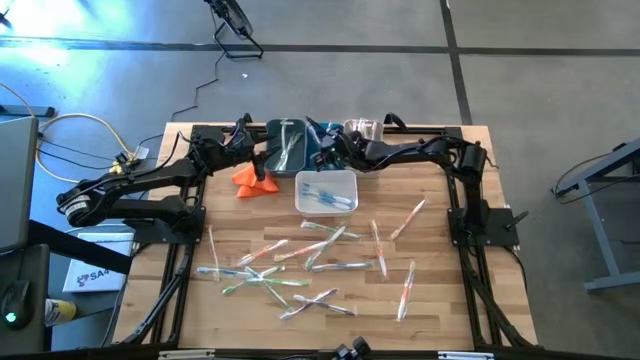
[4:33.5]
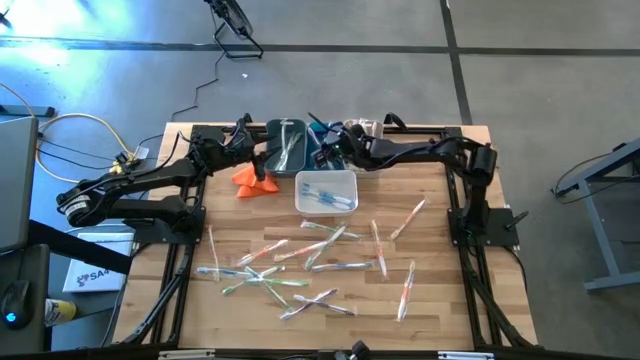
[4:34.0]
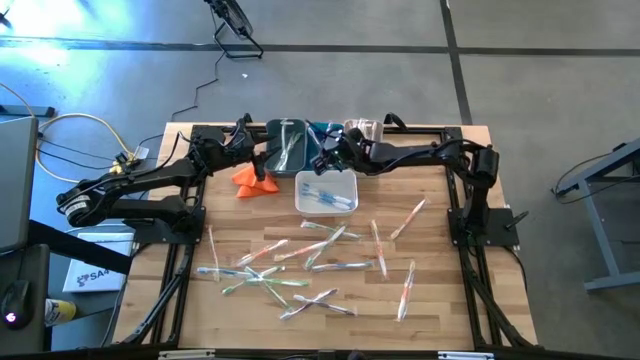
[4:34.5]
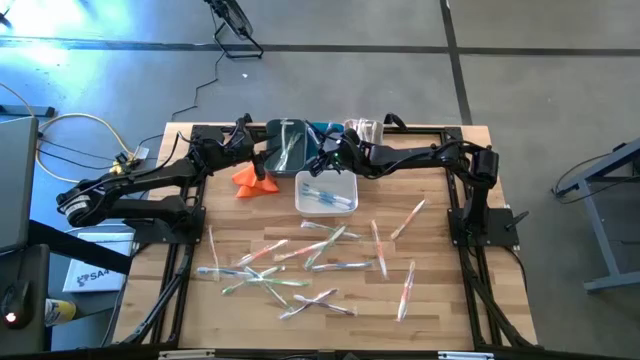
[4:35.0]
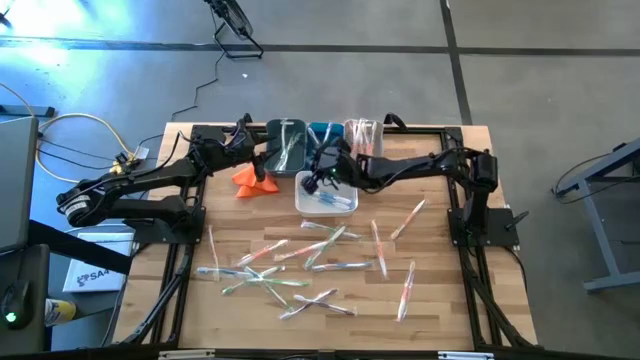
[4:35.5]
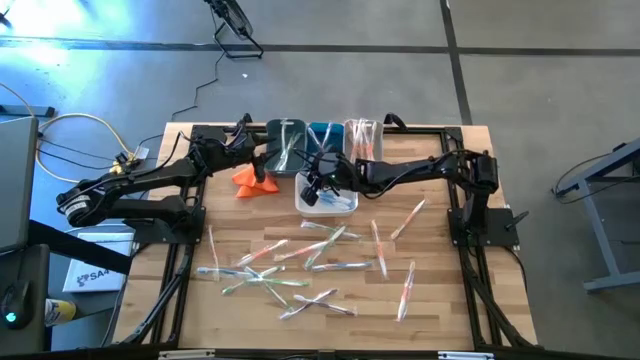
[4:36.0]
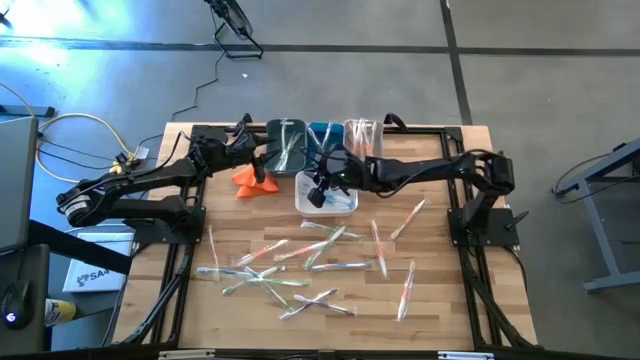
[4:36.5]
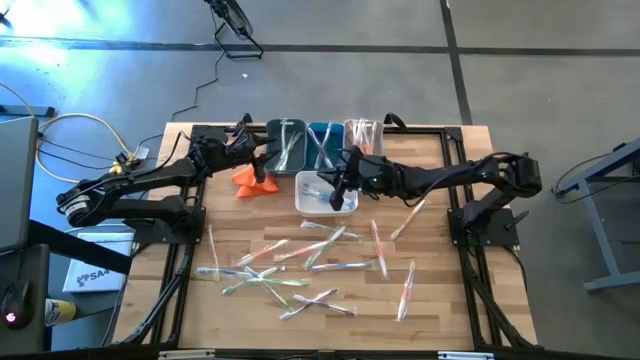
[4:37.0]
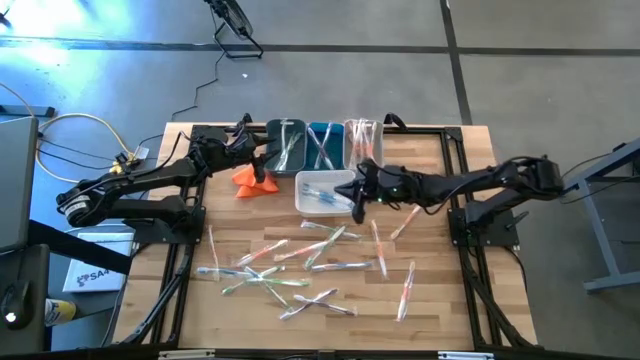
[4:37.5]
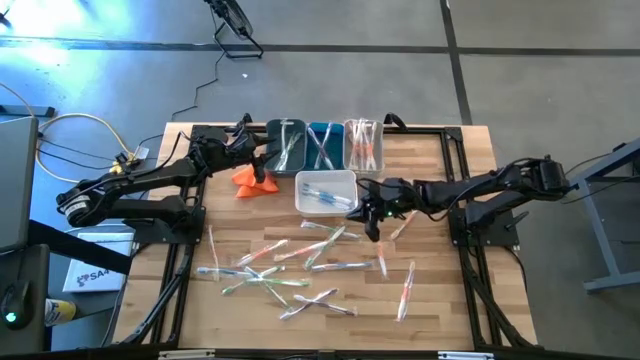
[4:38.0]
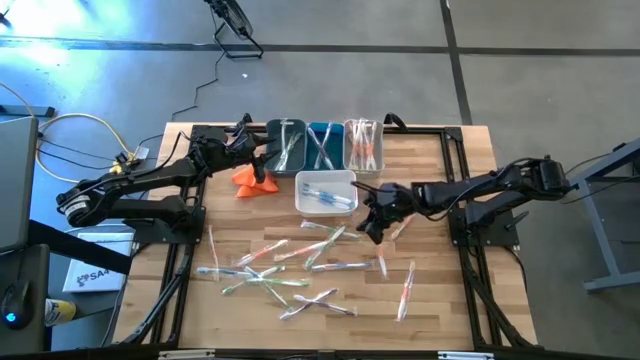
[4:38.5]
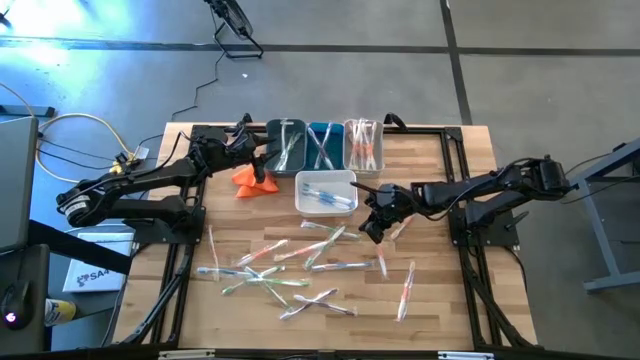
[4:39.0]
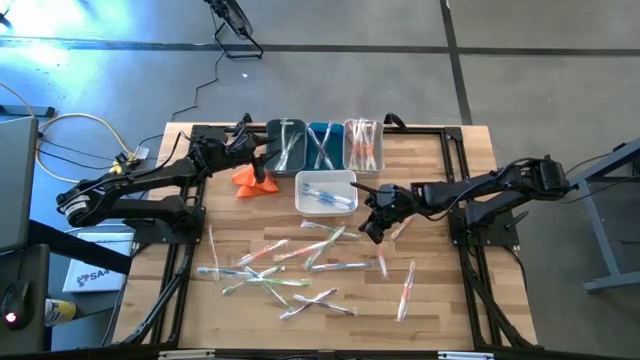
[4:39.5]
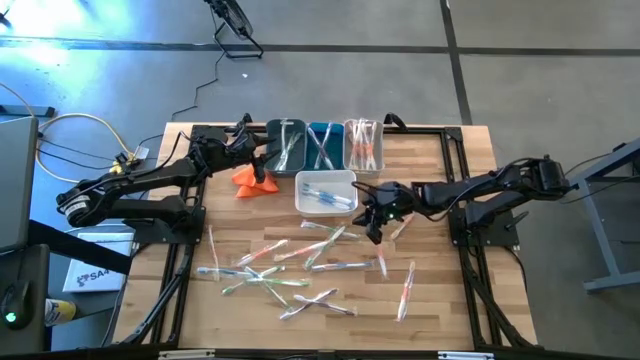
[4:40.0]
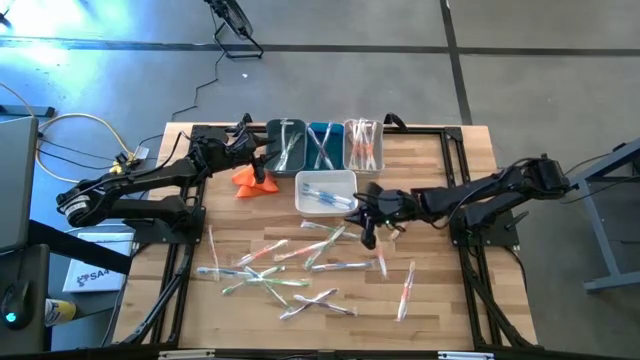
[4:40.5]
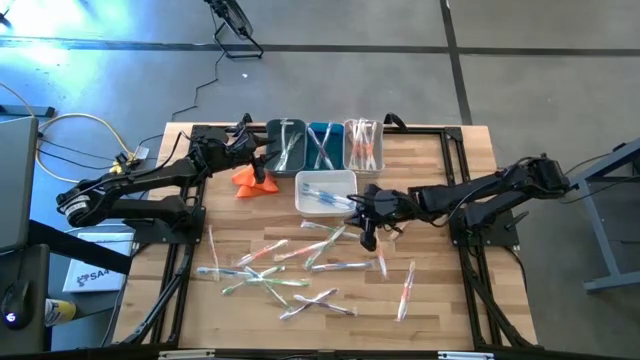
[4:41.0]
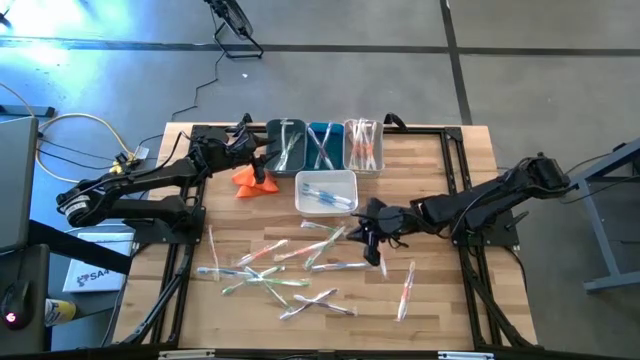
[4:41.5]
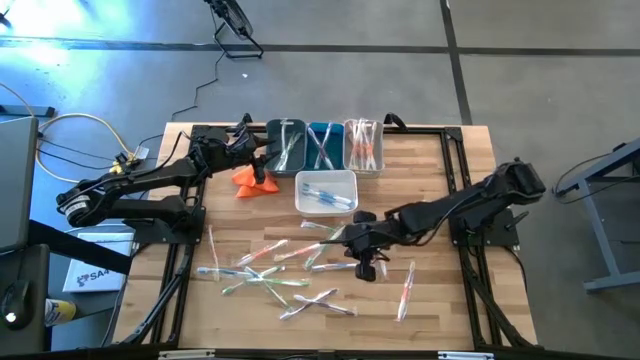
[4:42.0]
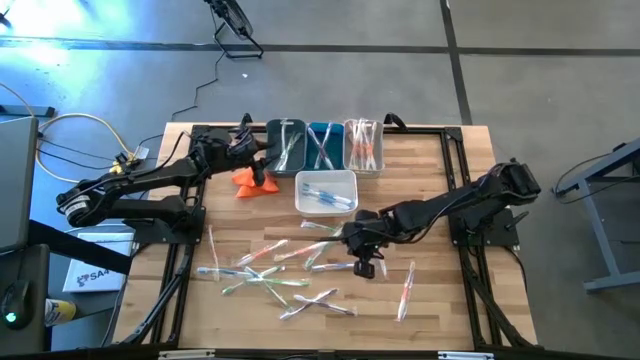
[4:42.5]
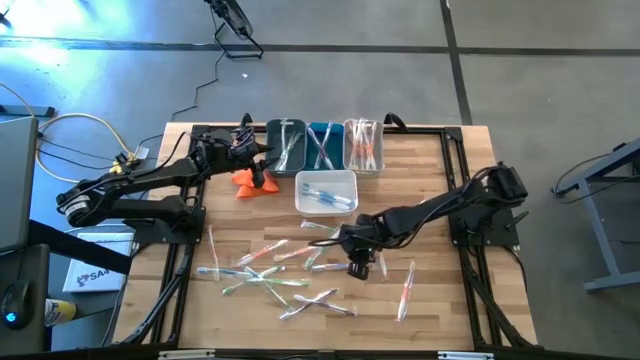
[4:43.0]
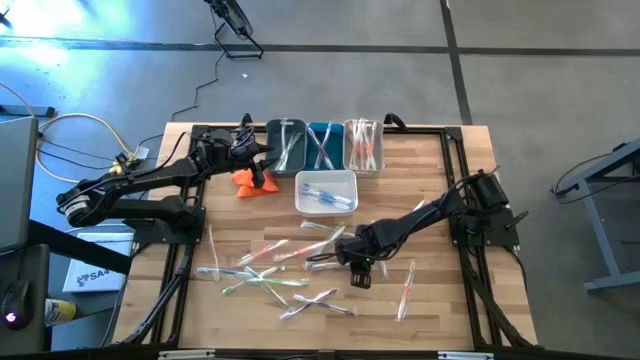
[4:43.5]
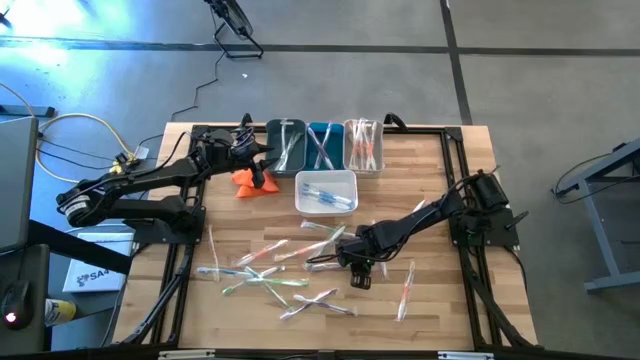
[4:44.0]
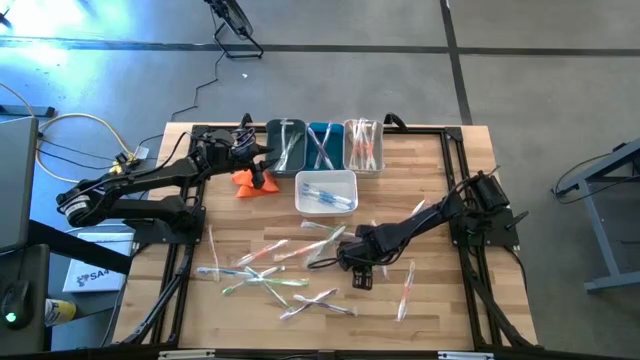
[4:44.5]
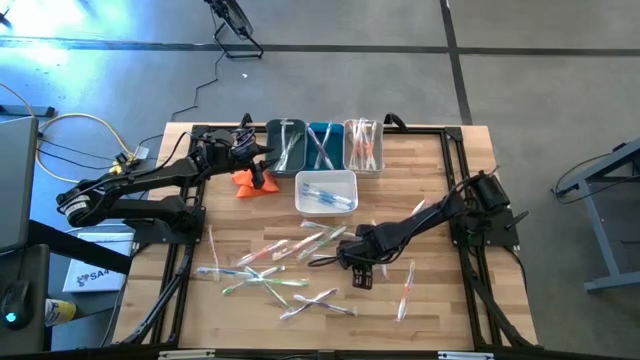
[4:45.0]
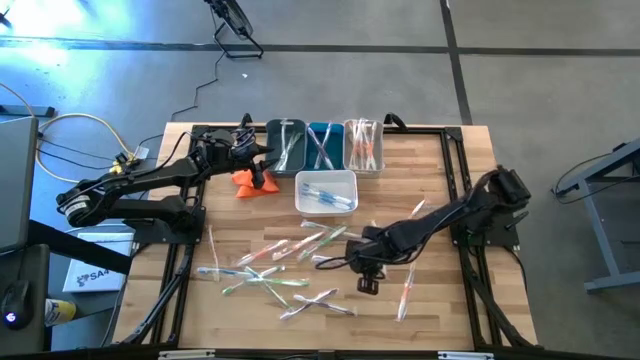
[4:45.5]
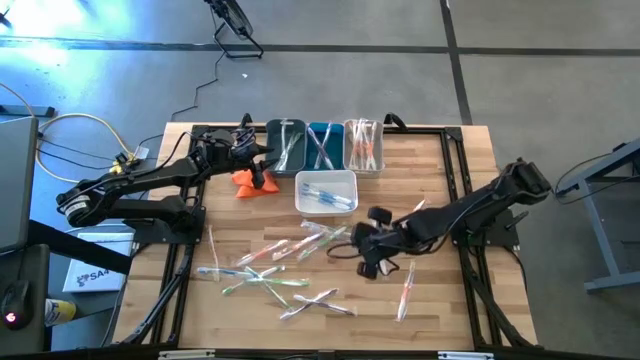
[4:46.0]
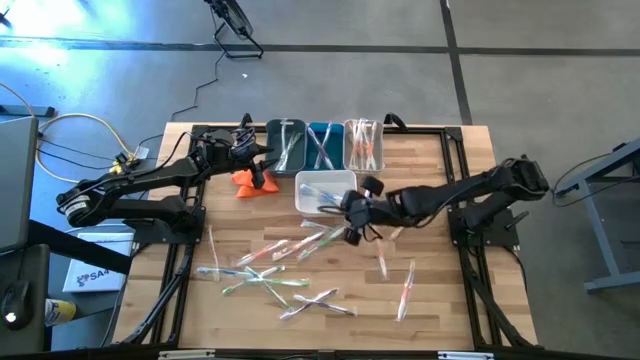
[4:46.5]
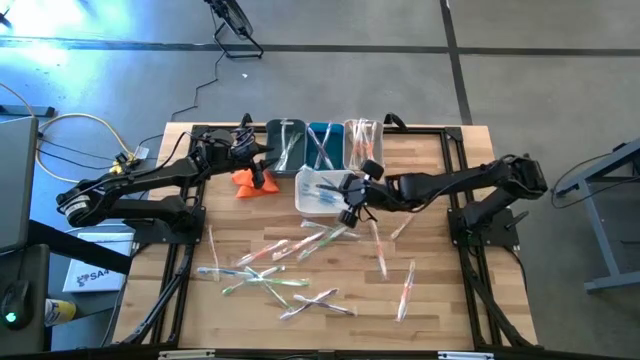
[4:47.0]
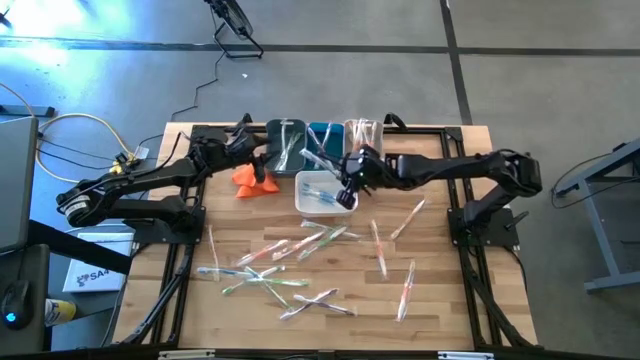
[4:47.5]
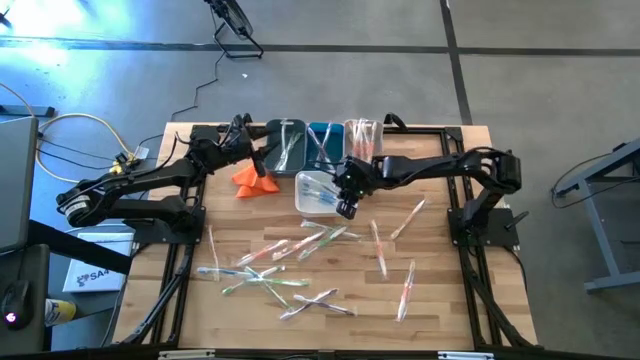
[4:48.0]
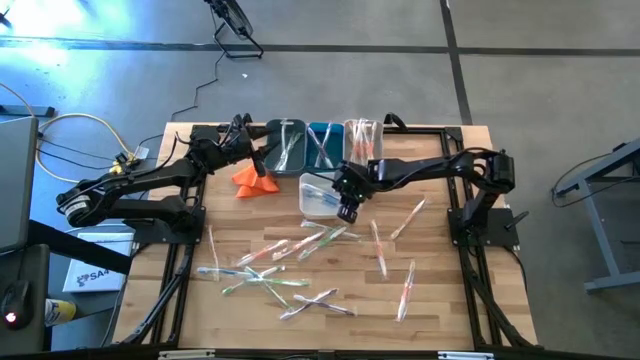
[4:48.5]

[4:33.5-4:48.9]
Task: Pick & Place Toothbrushes
Put the toothbrush into the white bin

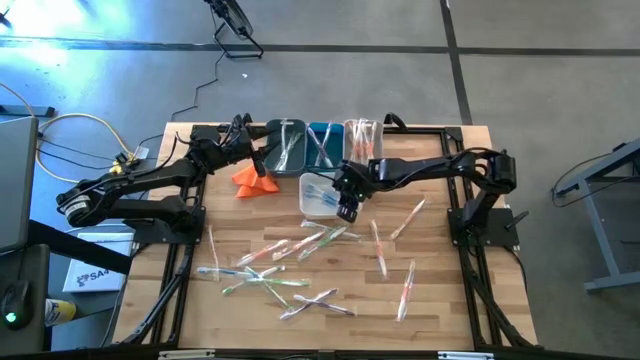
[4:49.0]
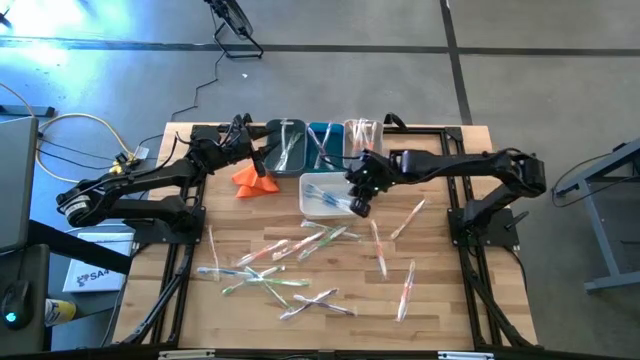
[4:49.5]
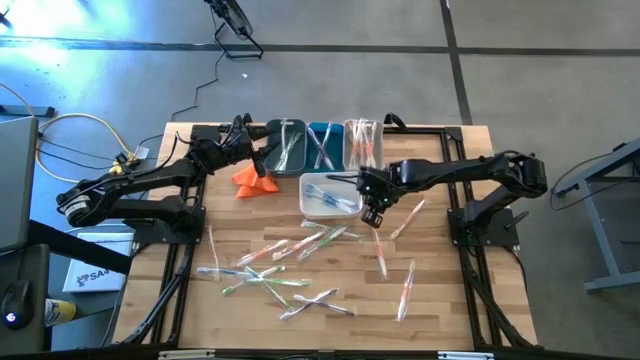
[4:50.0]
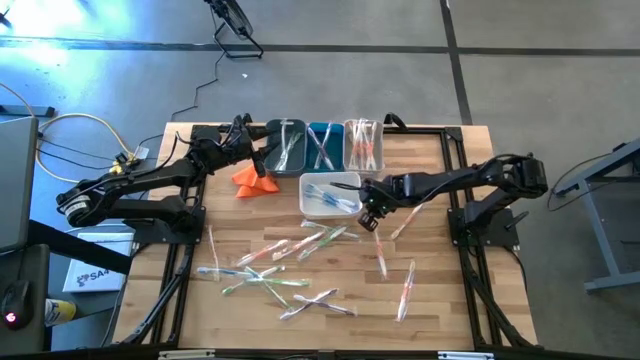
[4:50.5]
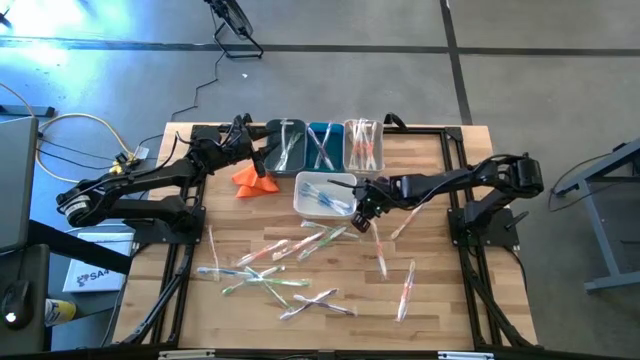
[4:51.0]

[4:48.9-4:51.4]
Adjust the white bin on the shelf

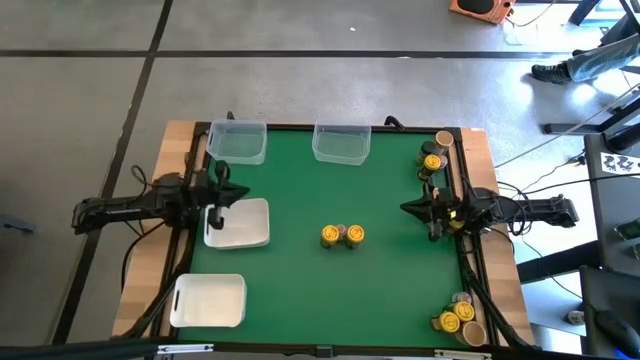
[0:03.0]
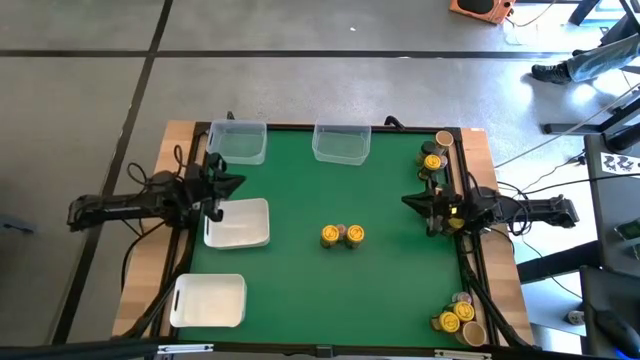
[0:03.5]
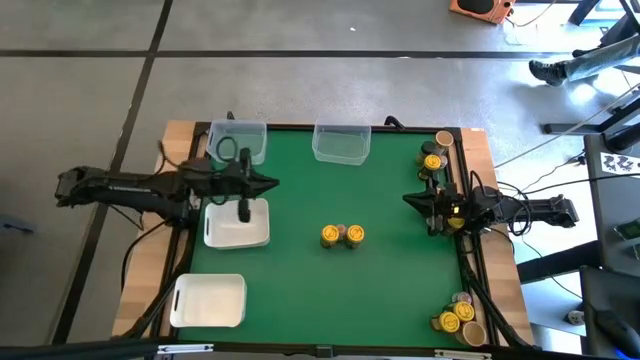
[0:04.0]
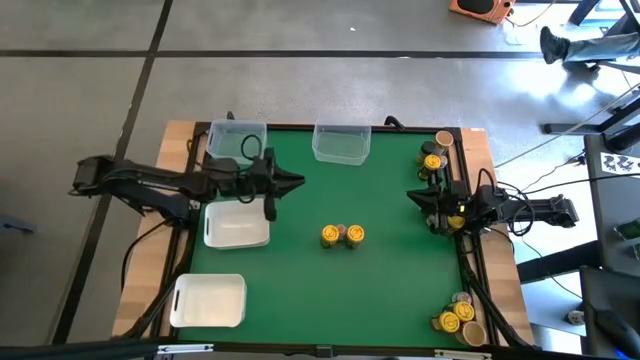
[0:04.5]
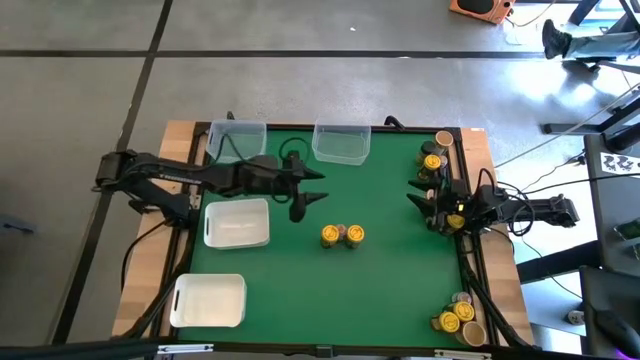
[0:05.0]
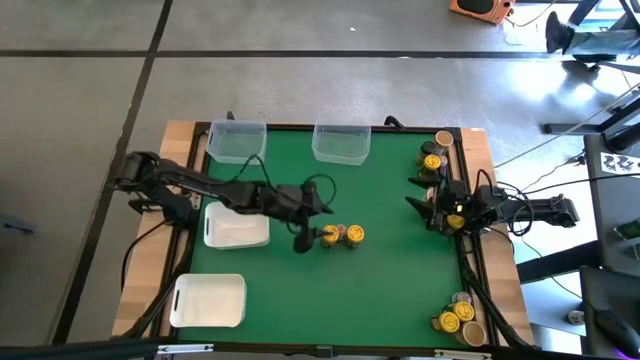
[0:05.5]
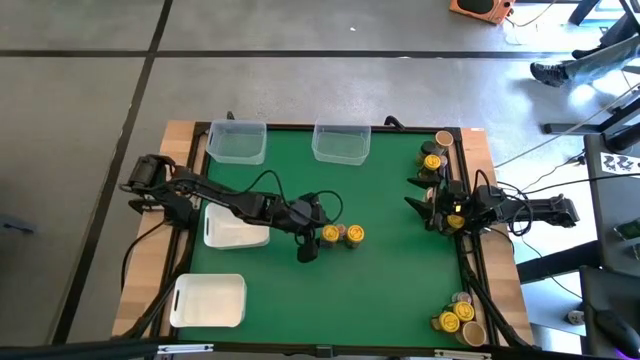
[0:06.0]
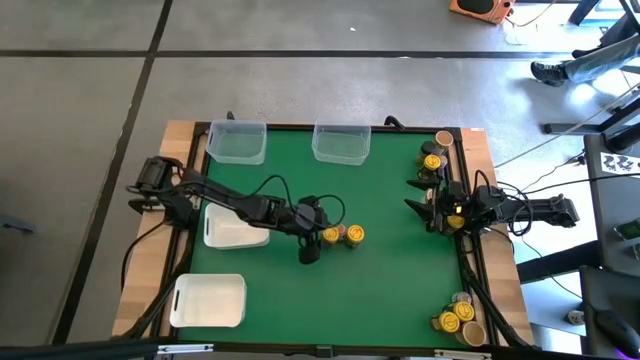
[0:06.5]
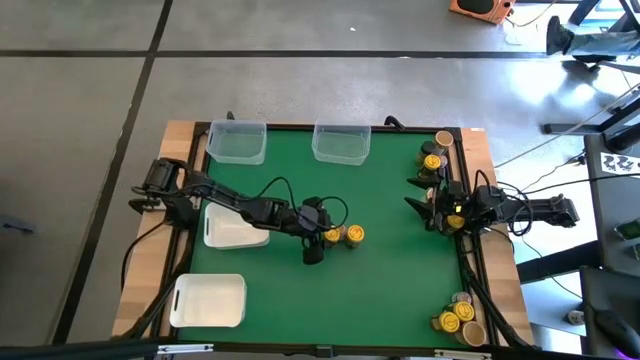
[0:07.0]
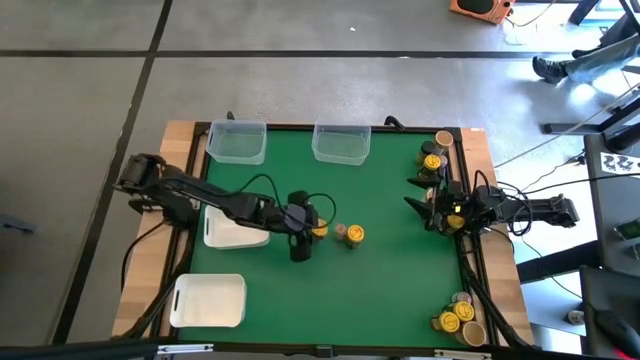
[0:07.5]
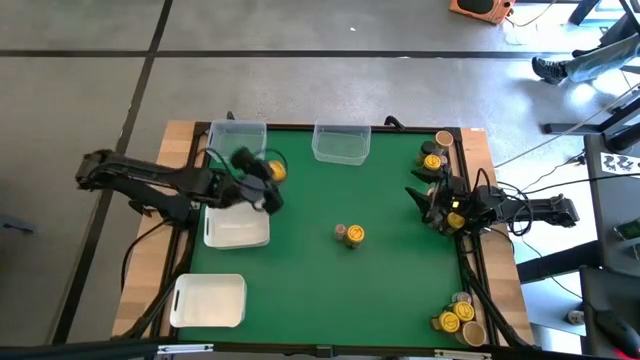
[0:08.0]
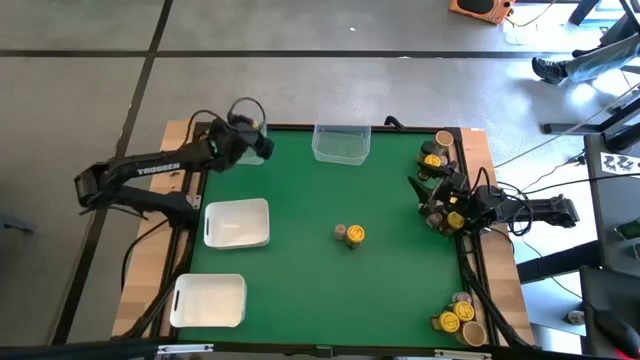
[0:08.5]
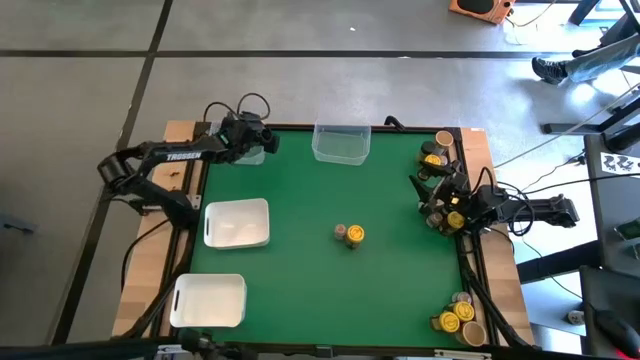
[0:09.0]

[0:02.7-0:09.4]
Task: Sort spices by type
Put the yellow seasoning bottle into the left transparent bin
